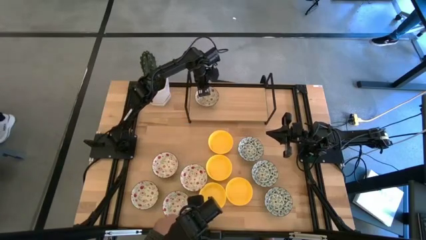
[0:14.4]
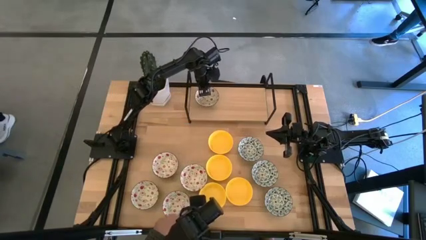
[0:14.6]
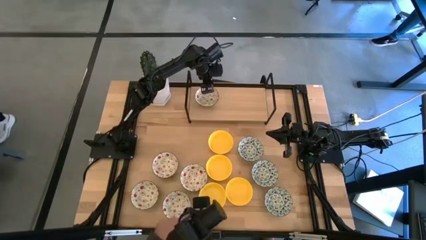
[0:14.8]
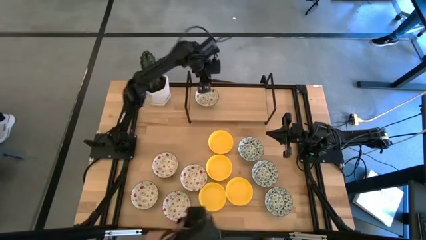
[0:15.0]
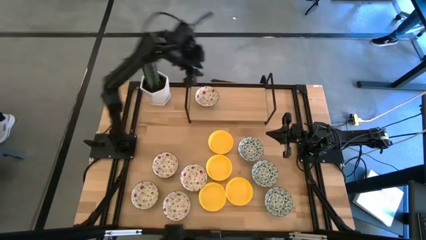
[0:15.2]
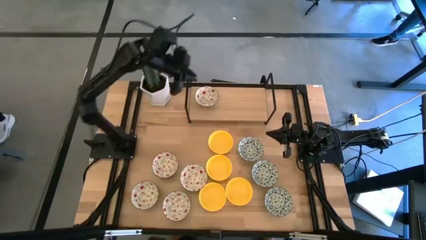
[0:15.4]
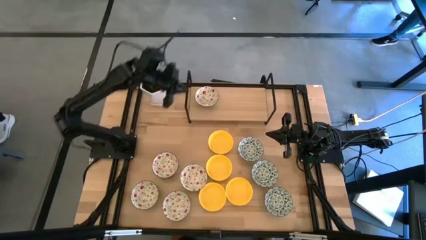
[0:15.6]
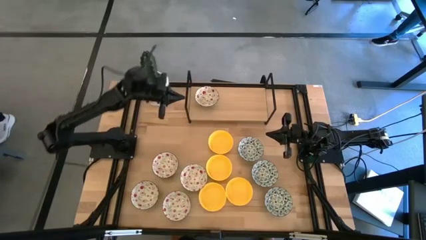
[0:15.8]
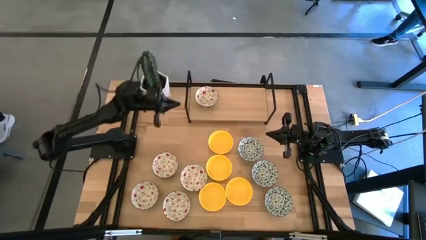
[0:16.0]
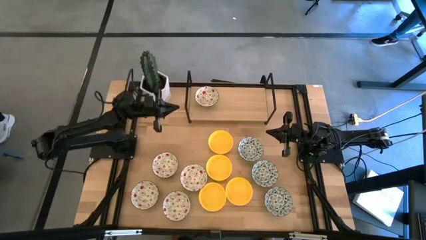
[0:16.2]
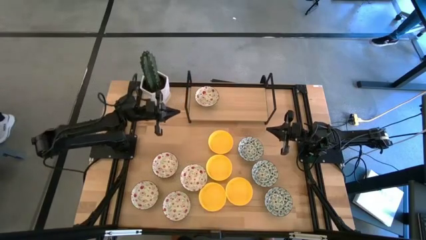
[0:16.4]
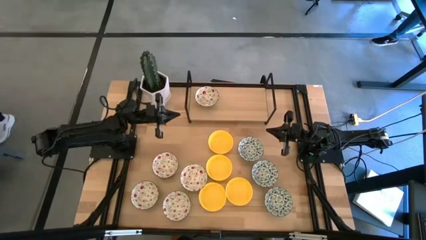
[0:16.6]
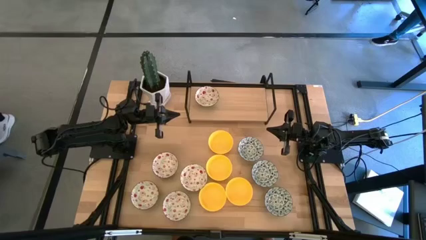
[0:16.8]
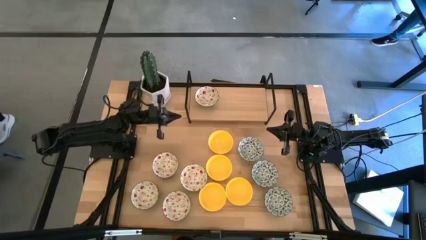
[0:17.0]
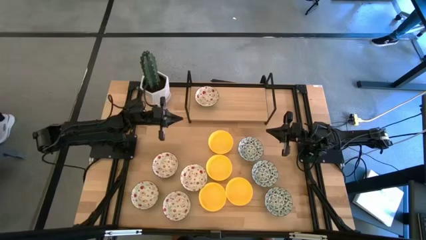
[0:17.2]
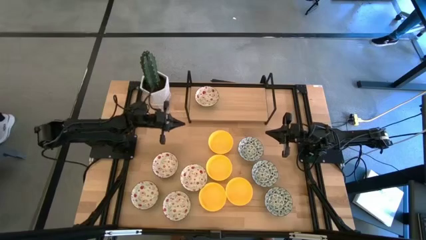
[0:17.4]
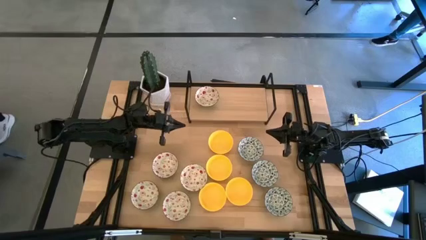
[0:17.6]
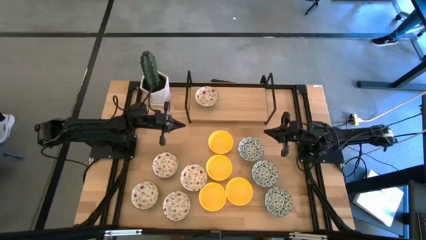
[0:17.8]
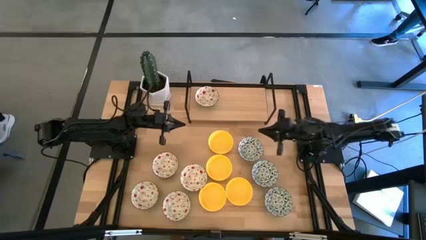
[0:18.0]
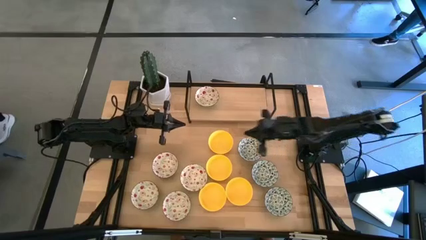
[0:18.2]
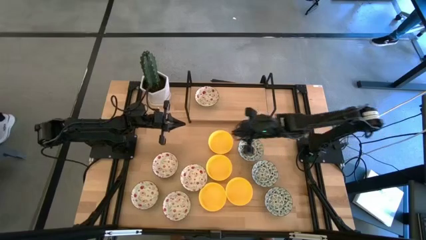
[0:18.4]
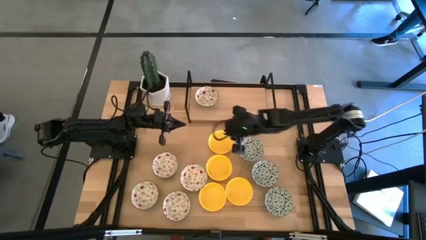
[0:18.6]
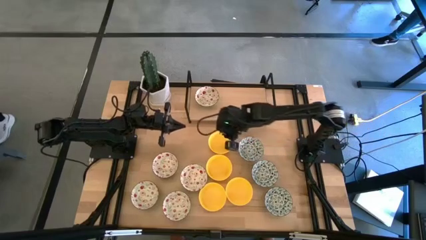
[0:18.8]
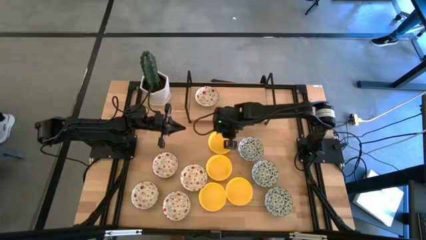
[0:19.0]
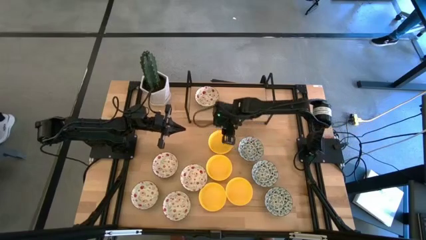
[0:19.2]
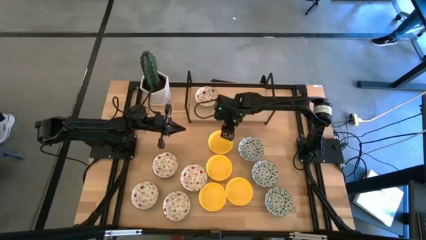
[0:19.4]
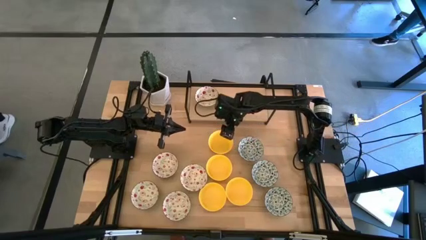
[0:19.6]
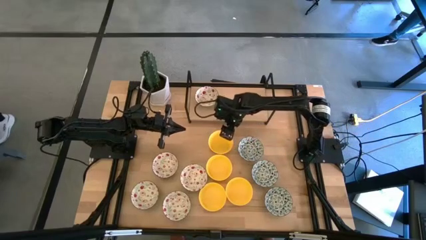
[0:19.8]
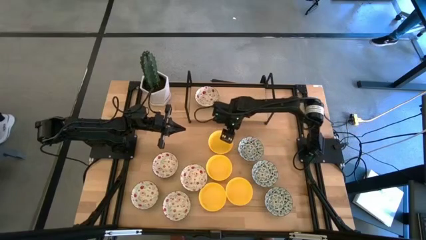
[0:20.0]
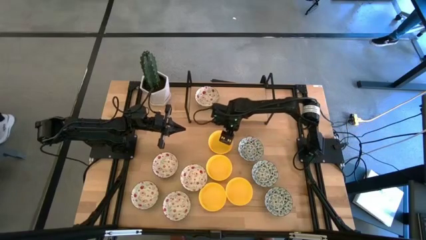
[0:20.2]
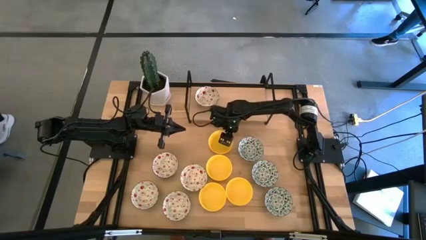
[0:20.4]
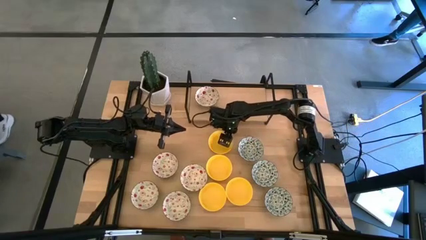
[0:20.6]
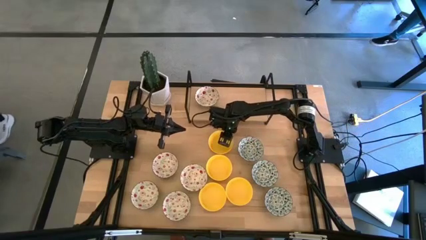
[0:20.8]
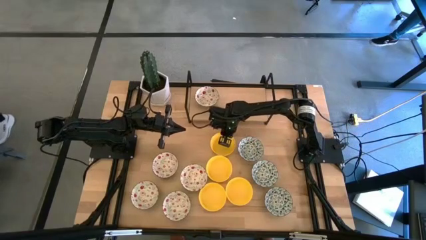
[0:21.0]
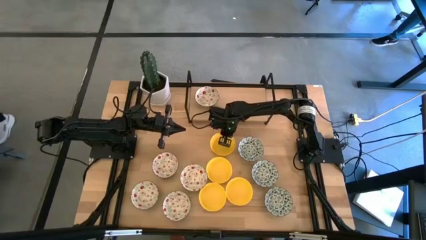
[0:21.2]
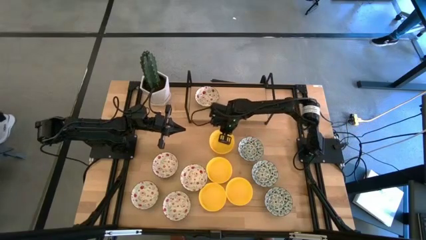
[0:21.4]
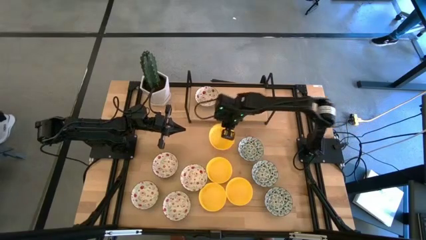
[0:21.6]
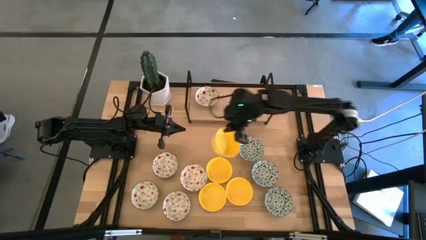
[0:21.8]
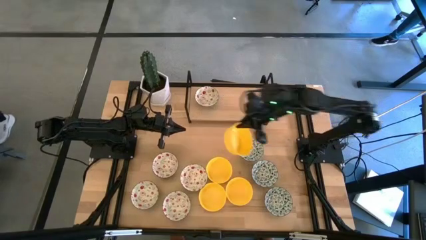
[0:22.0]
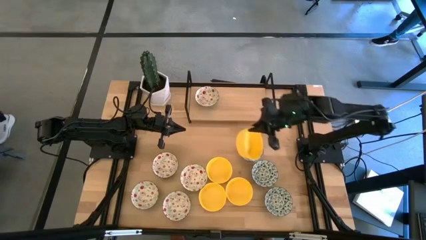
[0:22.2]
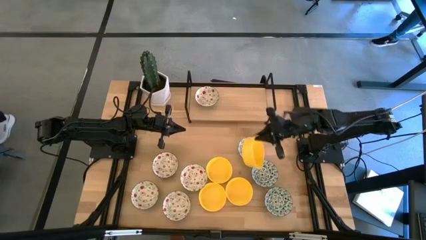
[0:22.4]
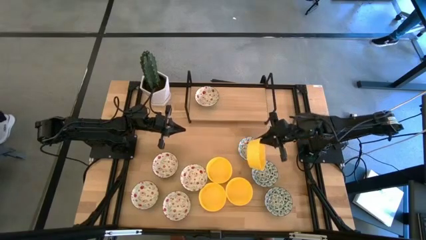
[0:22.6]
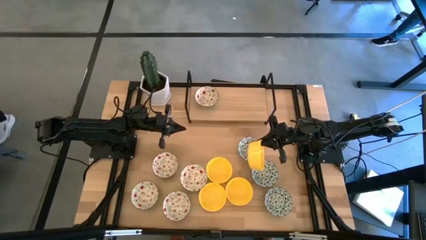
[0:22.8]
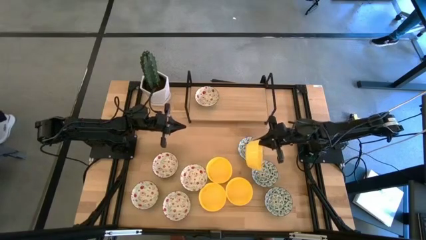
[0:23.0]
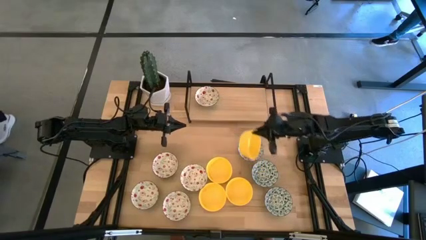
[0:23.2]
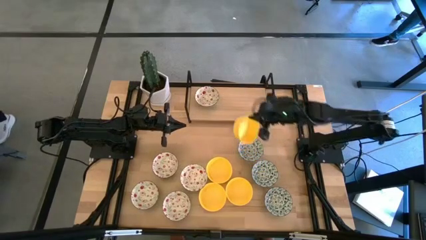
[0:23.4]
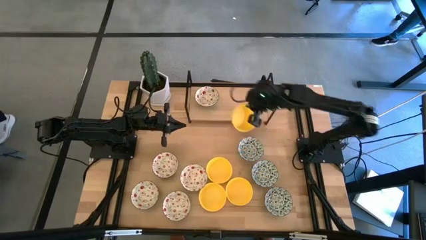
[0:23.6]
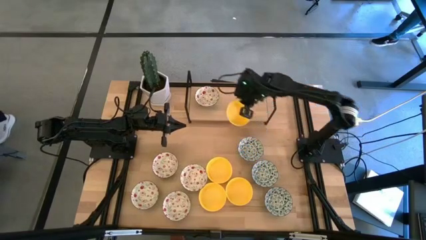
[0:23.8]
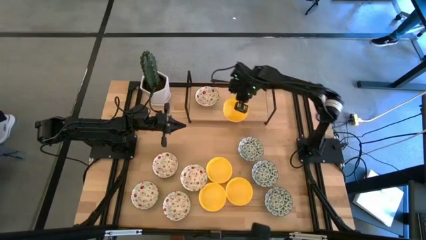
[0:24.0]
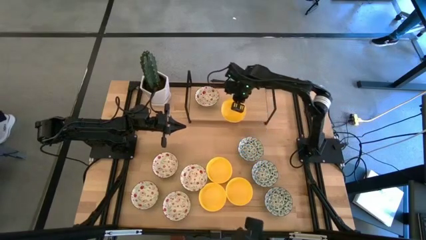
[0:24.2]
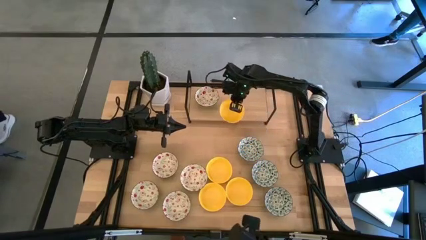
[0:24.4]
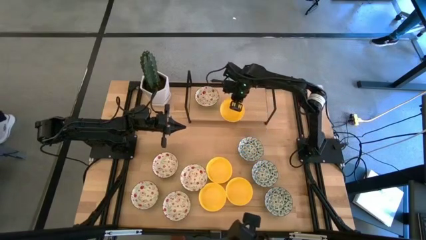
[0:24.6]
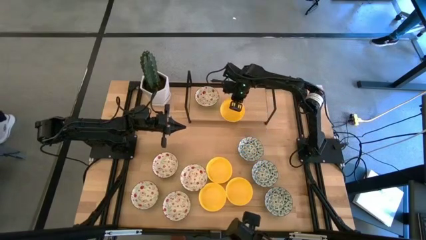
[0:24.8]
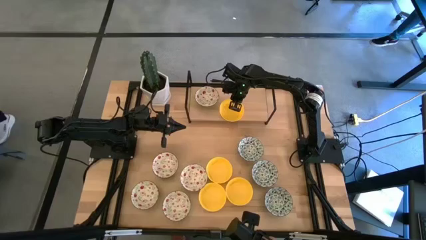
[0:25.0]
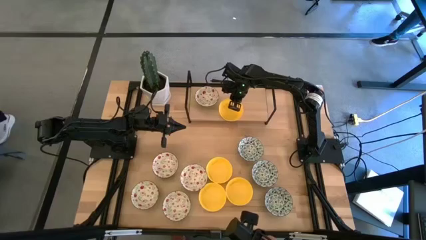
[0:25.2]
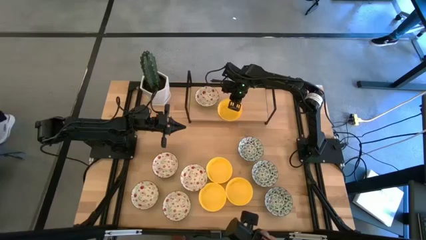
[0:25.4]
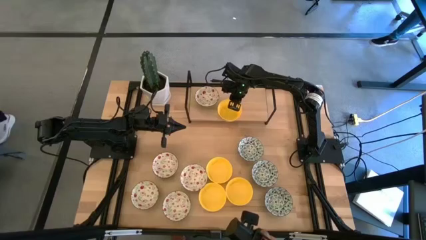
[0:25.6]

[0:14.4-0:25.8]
Task: Pick & Place Mini bowls
Put the yellow bowl on the shelf
